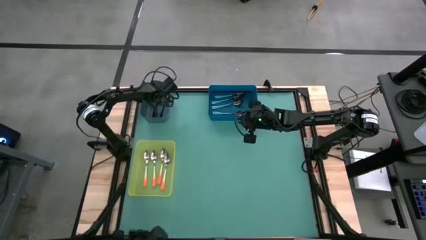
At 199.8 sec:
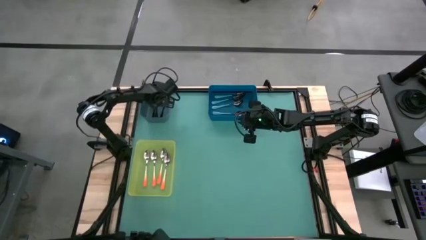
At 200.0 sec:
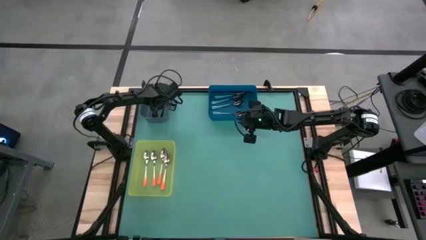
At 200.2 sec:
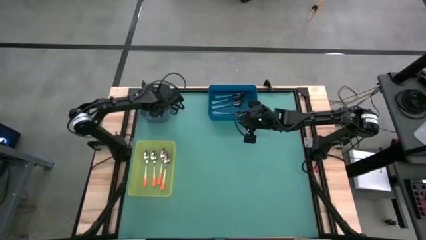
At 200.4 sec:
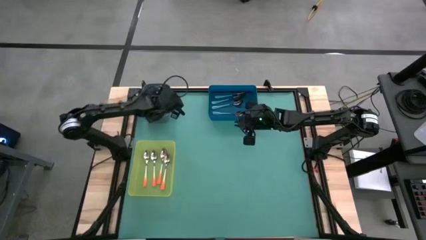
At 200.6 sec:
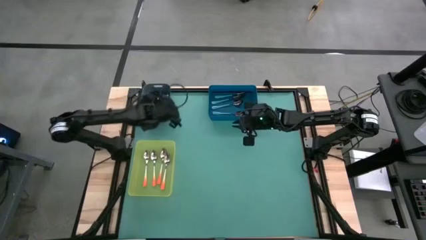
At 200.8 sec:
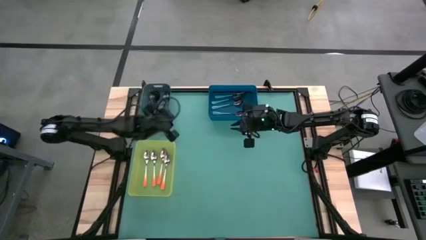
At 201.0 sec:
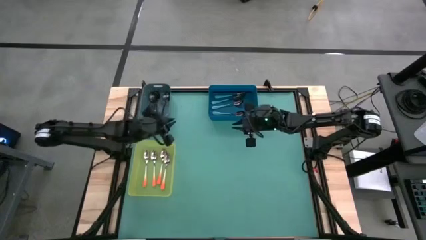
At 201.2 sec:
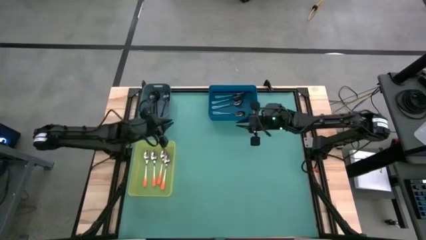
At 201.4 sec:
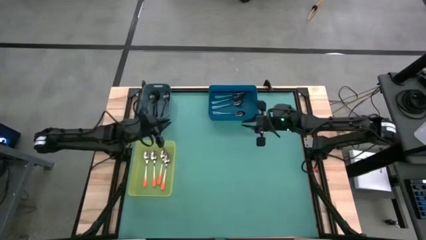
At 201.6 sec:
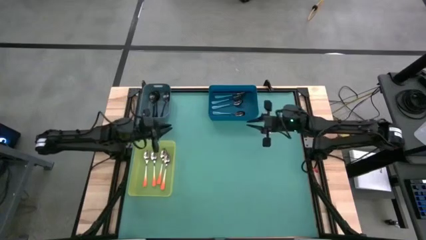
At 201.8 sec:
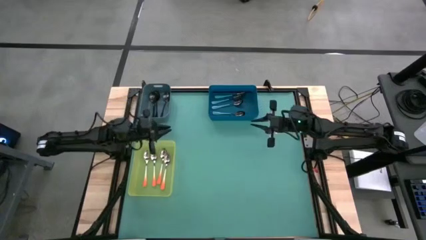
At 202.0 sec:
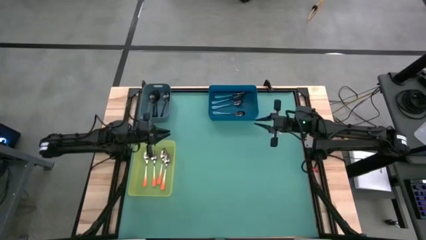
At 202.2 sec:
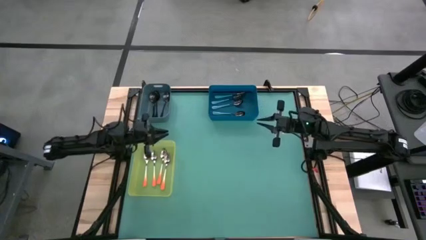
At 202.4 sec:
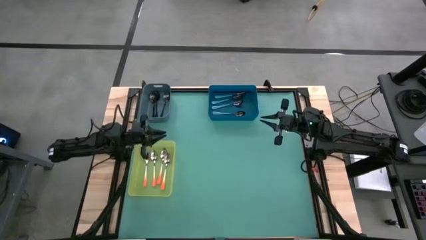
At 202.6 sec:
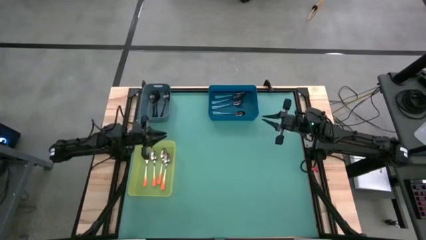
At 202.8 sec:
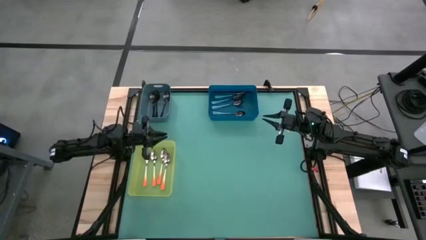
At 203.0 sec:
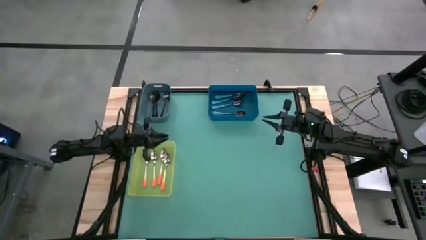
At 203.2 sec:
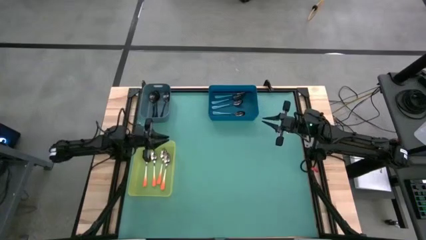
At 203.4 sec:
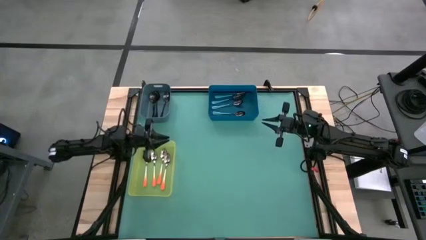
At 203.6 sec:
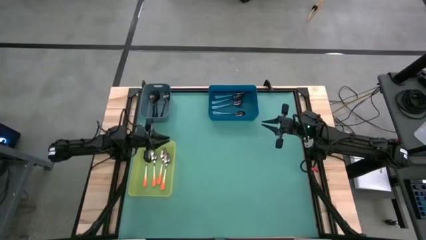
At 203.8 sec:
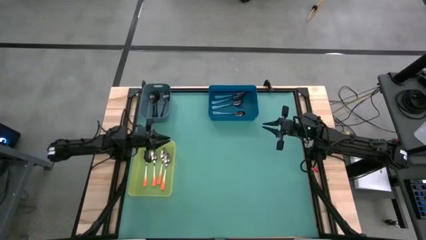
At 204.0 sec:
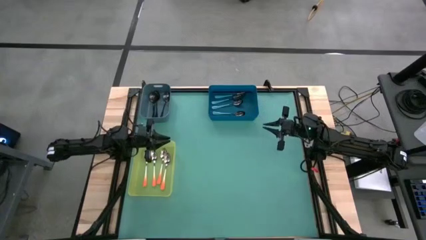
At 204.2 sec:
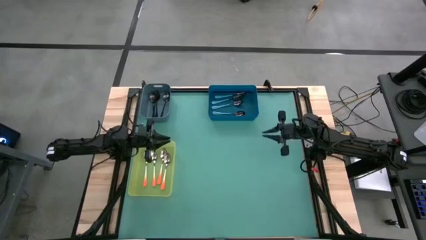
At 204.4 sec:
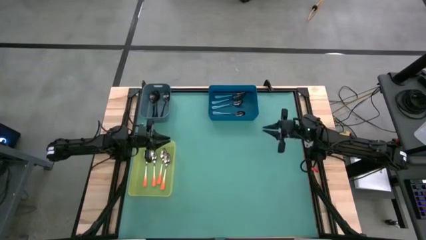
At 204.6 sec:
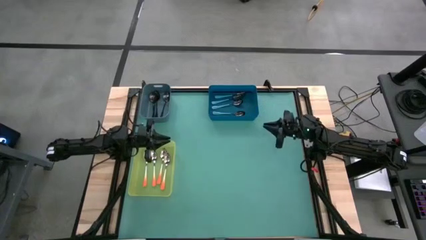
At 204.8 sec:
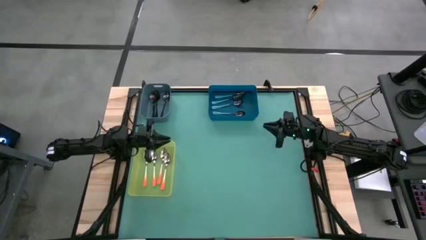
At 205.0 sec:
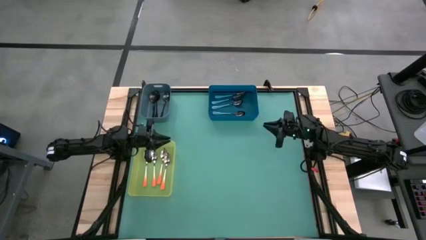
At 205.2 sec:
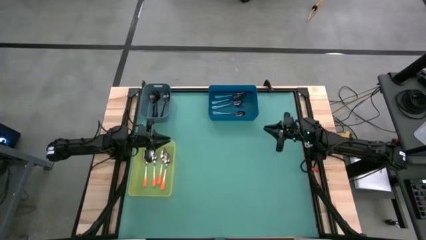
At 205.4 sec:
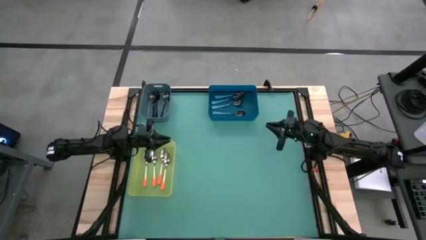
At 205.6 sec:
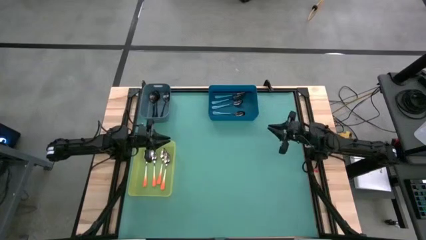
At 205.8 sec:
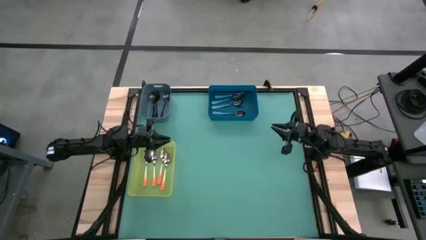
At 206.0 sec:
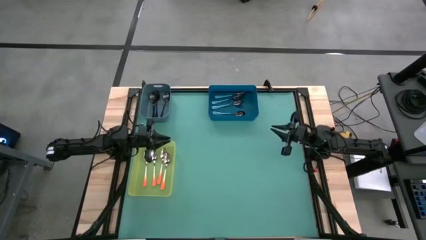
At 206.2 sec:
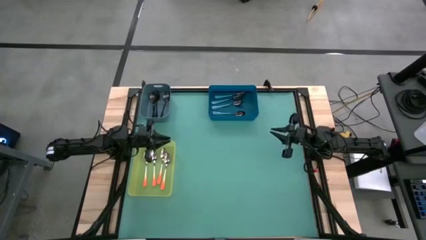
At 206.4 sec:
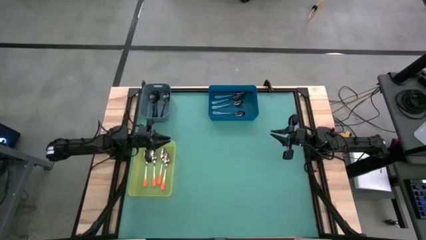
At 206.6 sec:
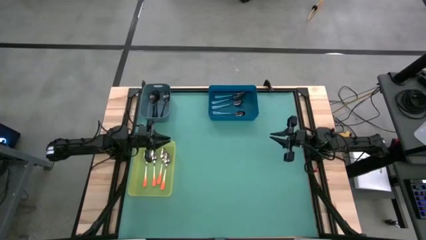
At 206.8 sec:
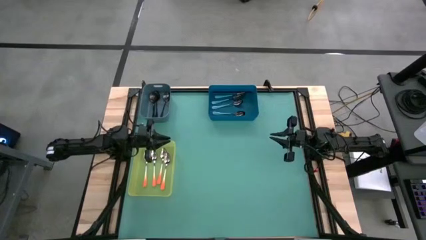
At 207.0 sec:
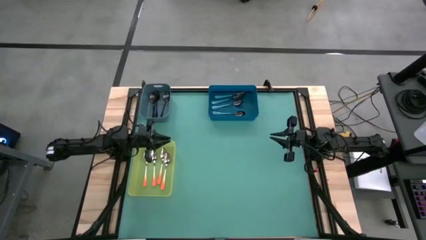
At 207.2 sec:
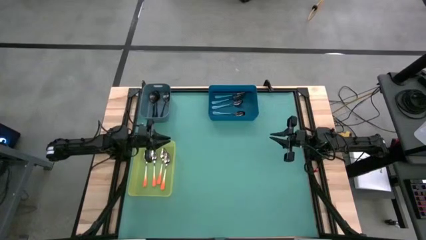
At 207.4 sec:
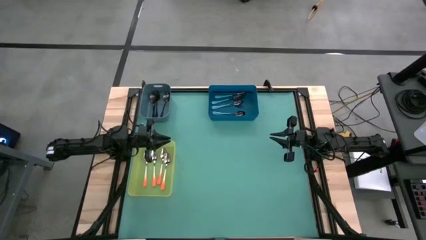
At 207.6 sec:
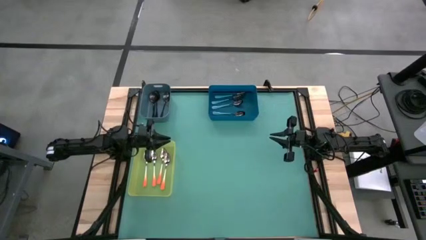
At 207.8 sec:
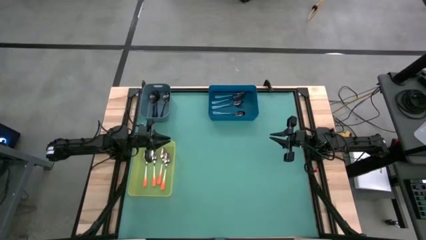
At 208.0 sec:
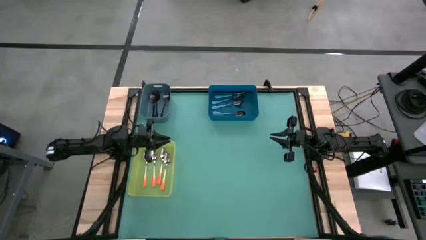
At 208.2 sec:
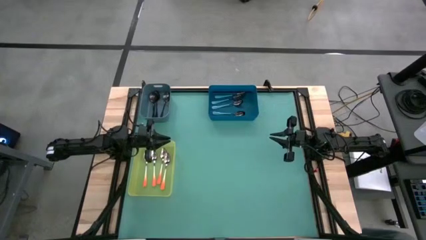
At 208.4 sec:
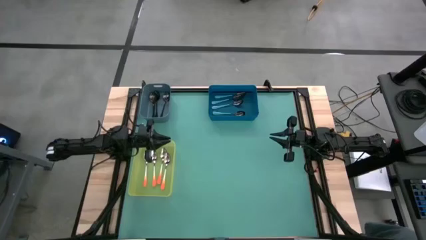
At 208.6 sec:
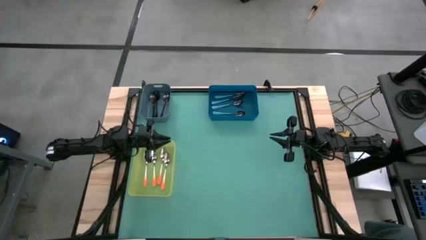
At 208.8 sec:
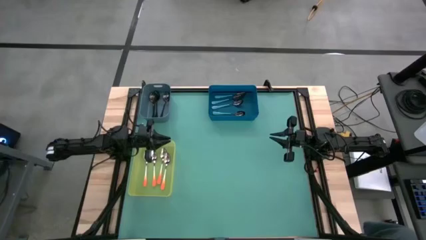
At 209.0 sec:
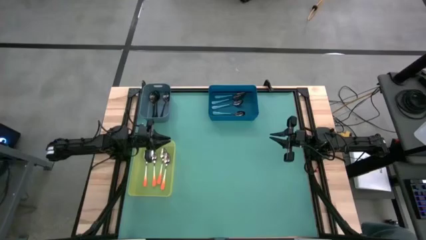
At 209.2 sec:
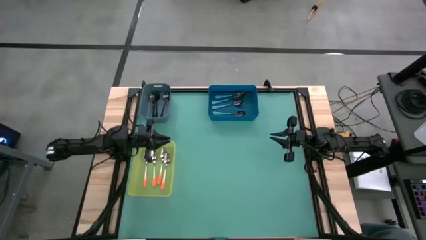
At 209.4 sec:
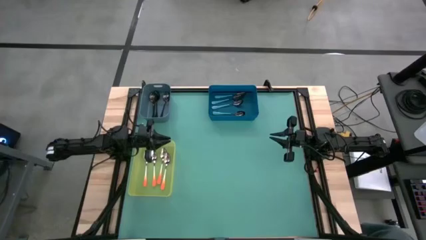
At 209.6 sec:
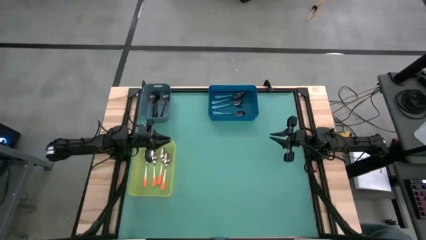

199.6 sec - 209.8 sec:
Task: Sort silverware by color (type)
Return to Home Position
